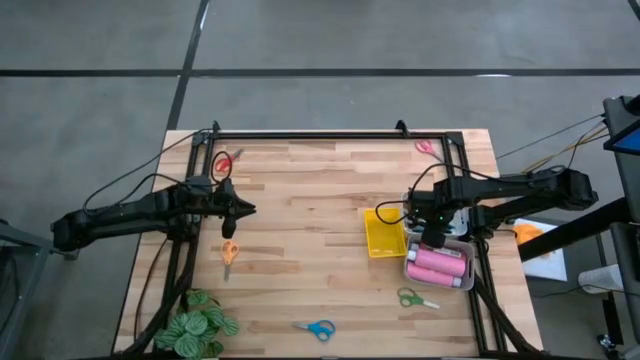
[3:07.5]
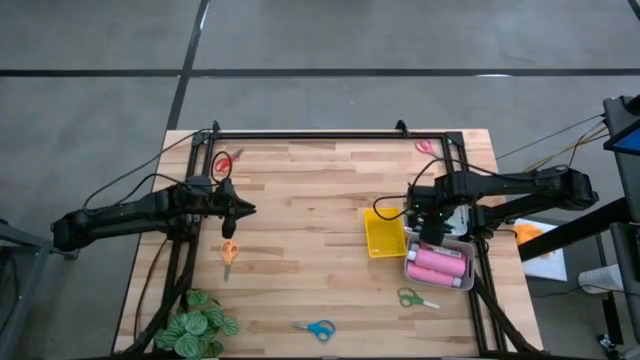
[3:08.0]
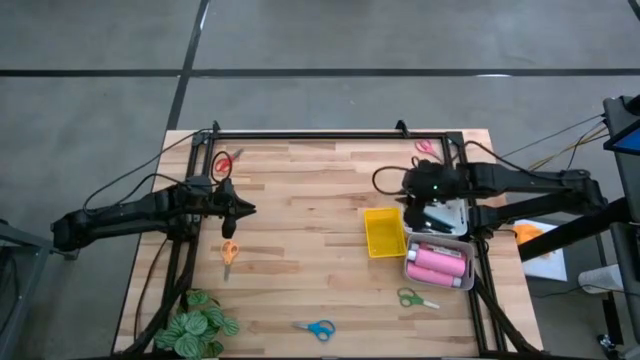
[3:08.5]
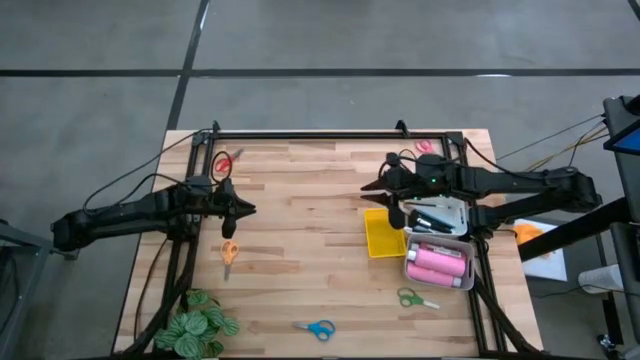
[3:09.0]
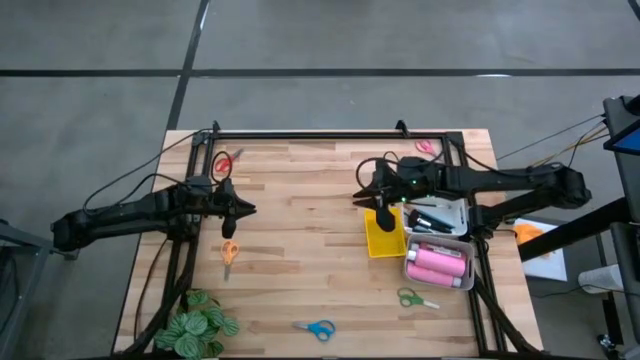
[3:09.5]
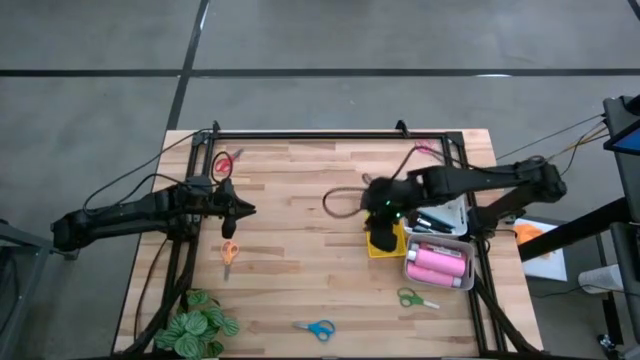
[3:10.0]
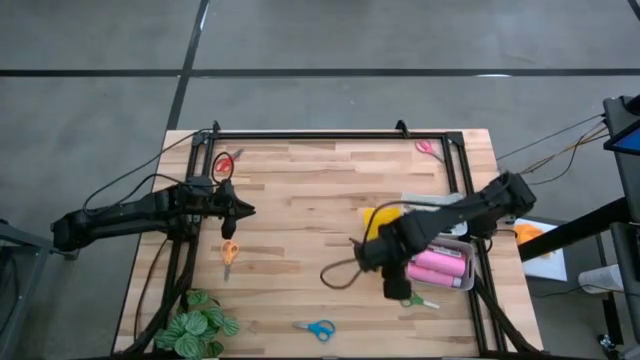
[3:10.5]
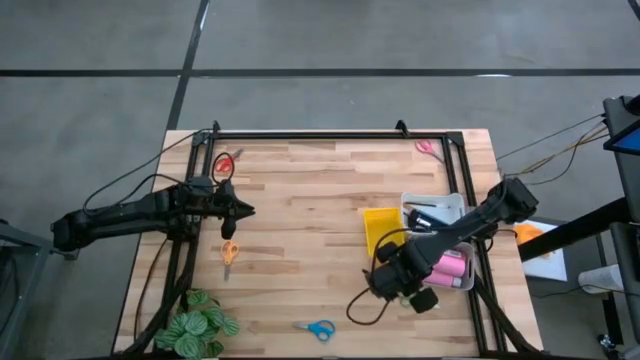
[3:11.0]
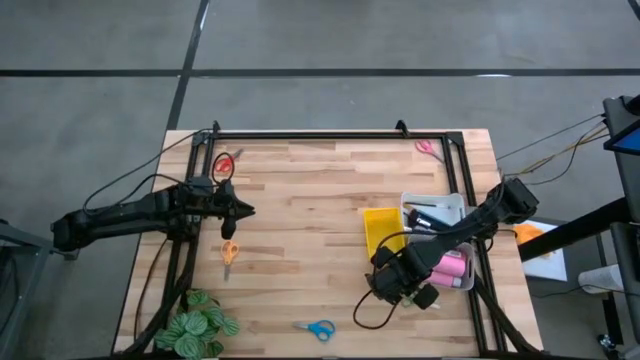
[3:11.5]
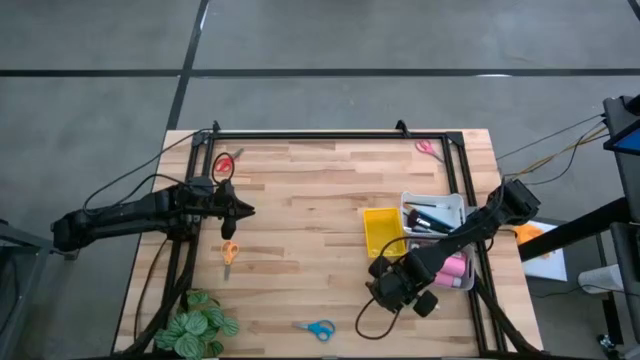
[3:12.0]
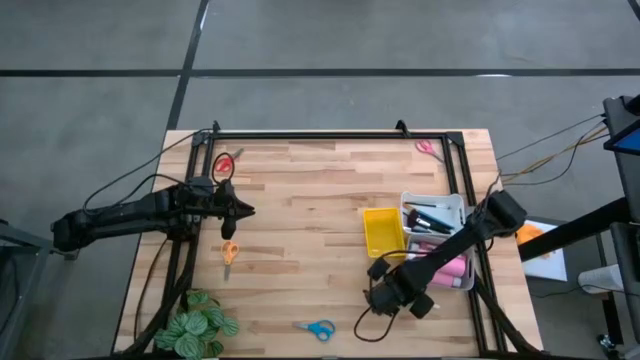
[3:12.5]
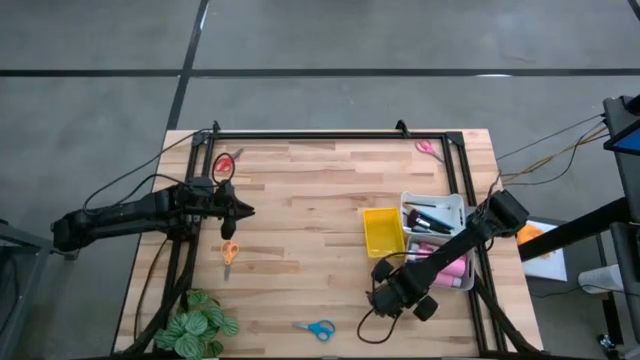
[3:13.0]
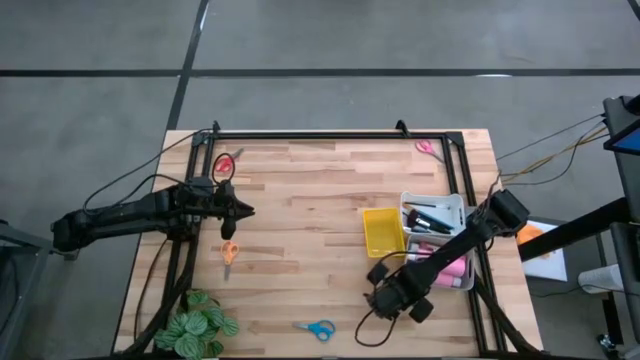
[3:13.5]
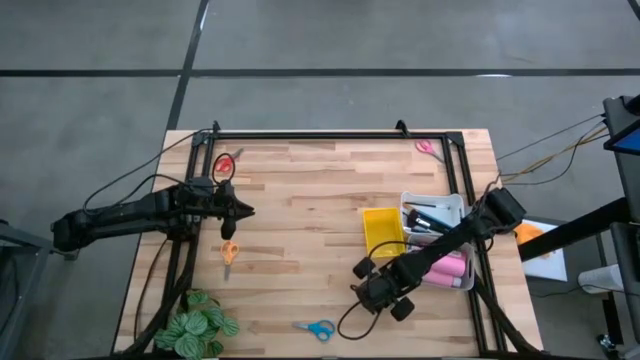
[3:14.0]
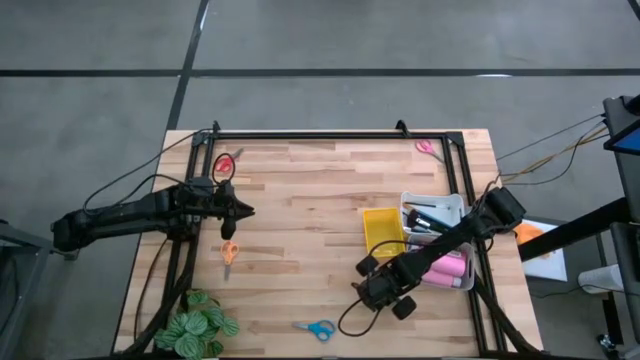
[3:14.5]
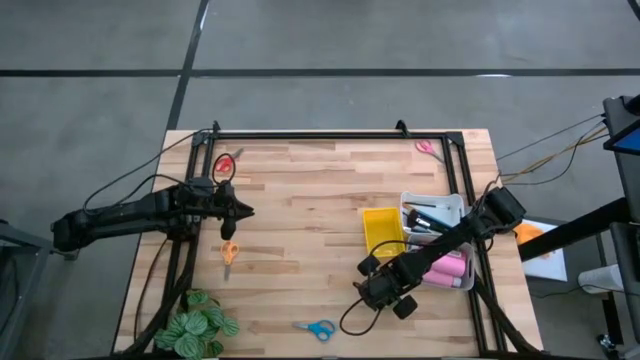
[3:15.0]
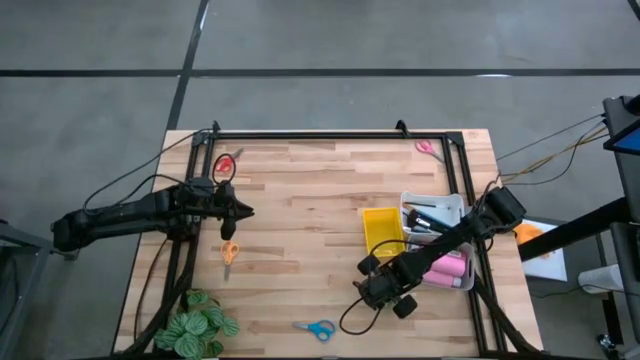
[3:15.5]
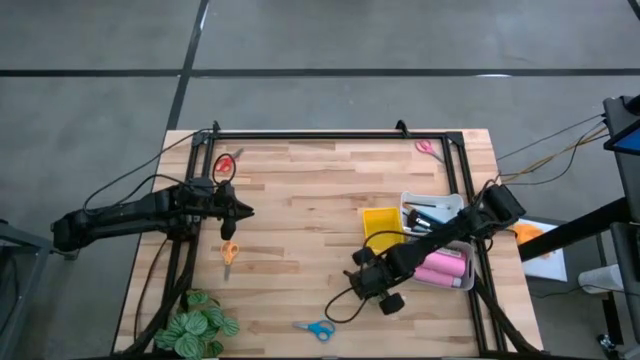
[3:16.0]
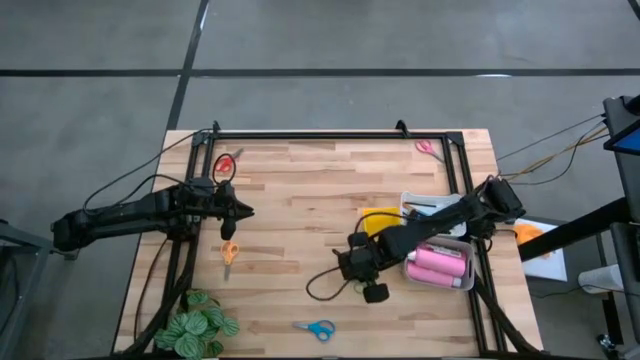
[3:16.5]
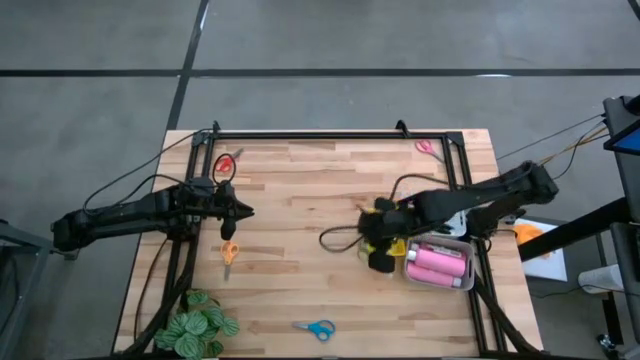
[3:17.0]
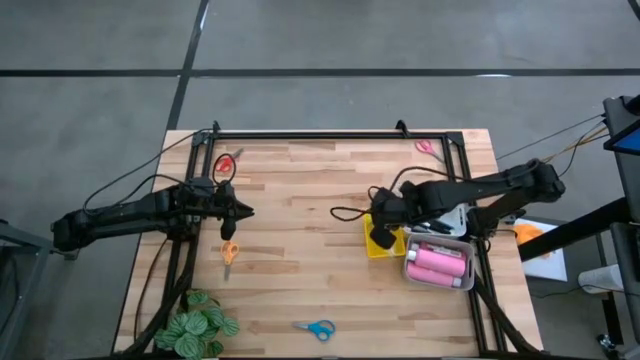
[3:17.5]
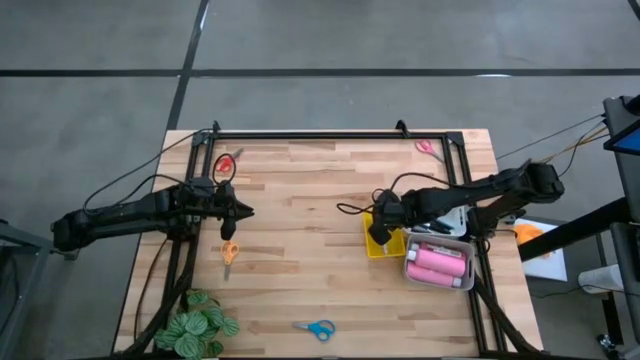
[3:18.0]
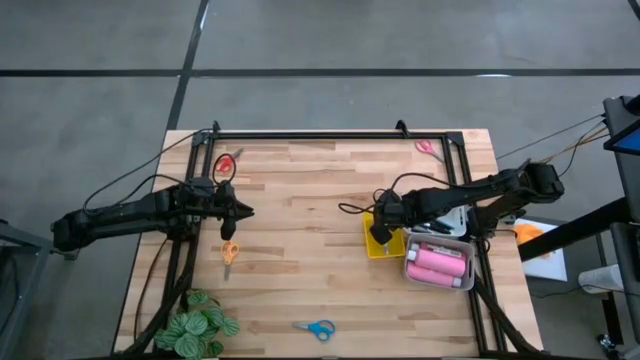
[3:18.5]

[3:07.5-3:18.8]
Task: Pick & Place Paint Supplies
Put the green scissors into the yellow bin

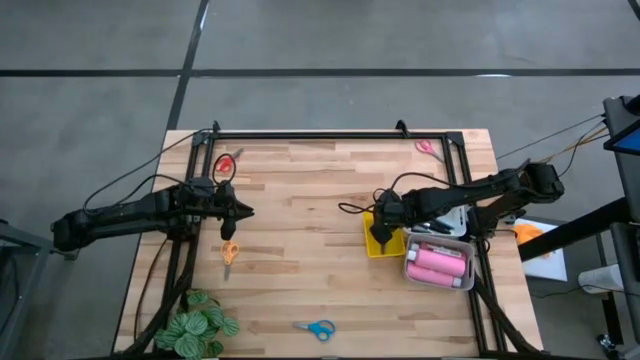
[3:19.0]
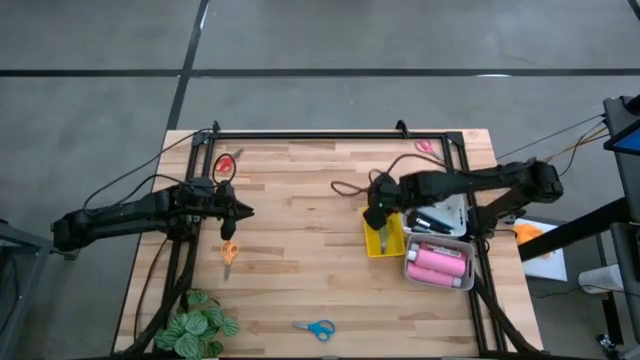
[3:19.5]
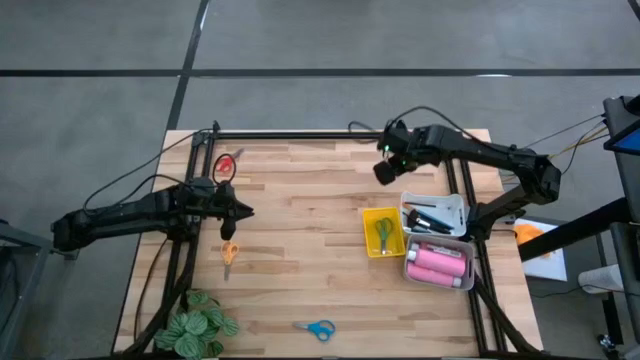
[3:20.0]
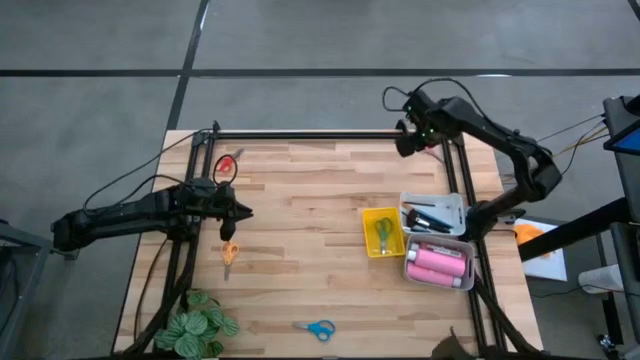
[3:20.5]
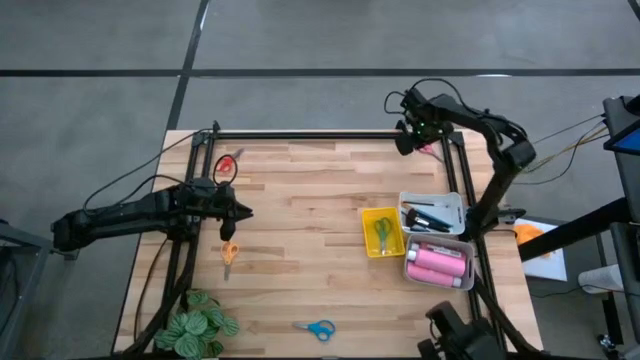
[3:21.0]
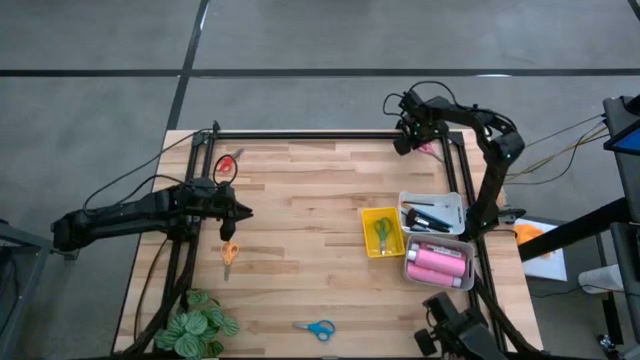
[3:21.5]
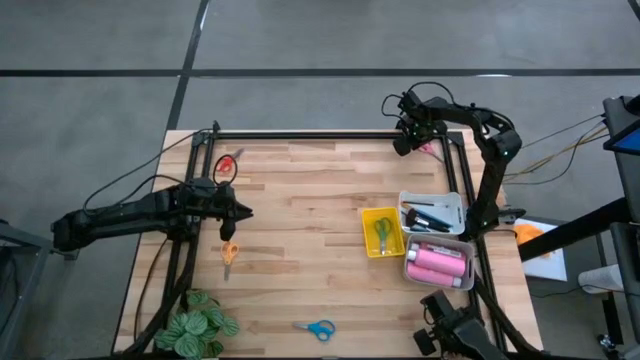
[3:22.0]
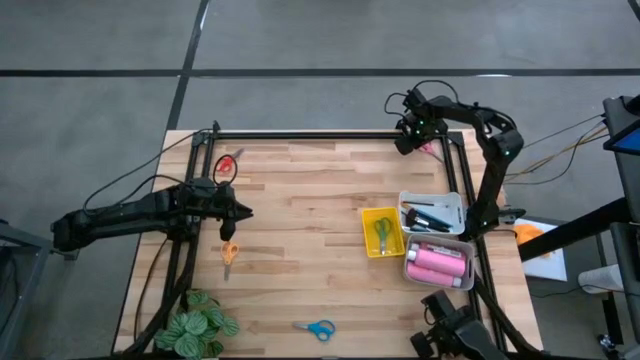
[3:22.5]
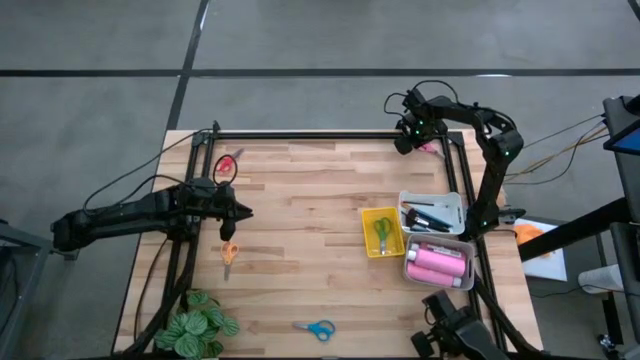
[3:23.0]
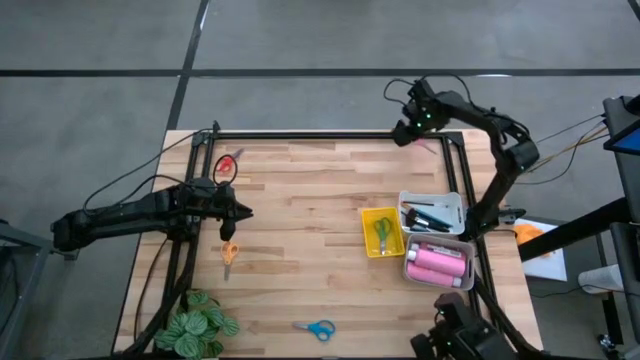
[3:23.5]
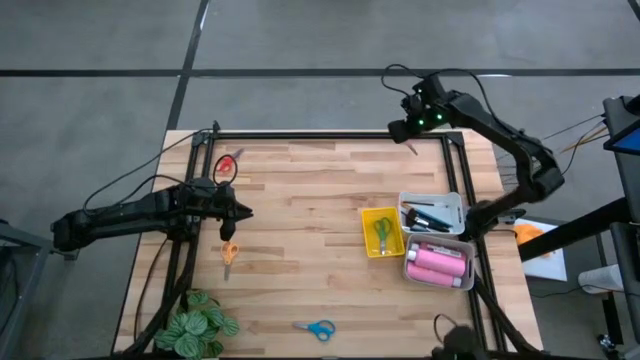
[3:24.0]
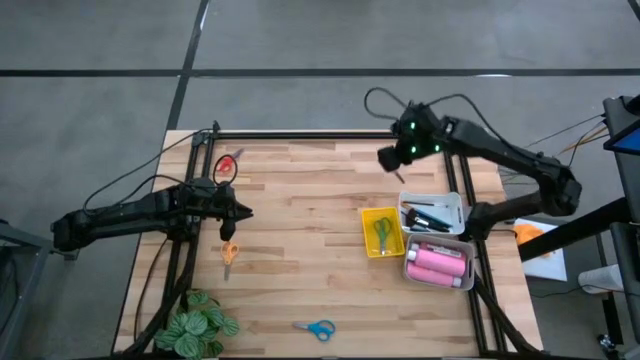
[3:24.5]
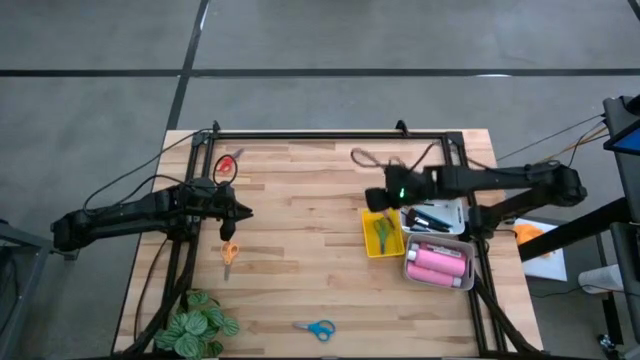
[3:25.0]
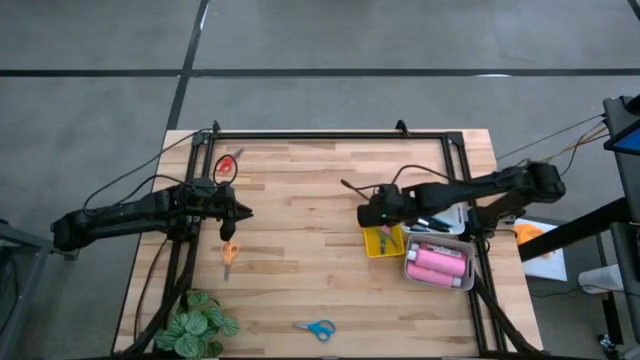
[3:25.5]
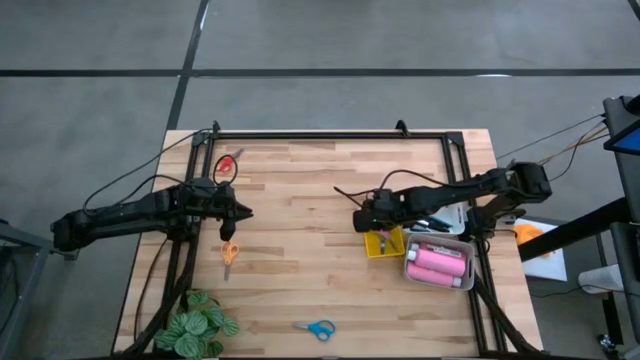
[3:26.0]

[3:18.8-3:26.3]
Put the pink scissors into the yellow bin

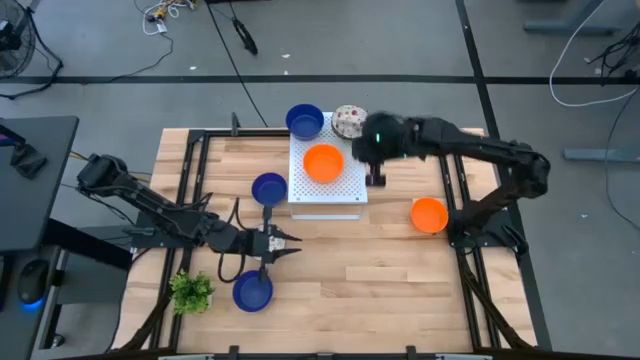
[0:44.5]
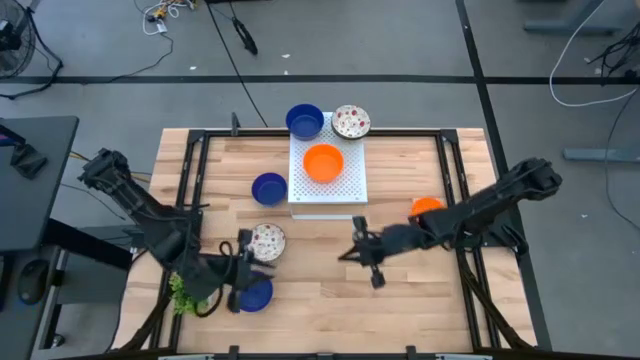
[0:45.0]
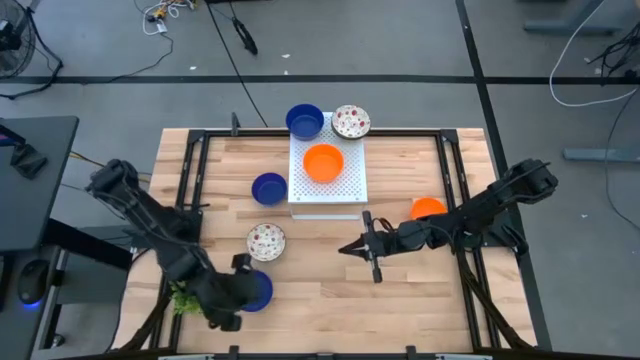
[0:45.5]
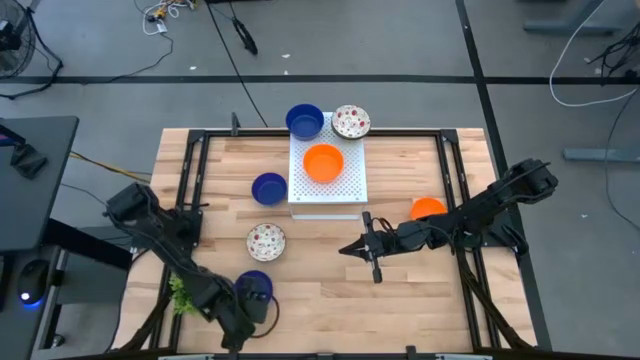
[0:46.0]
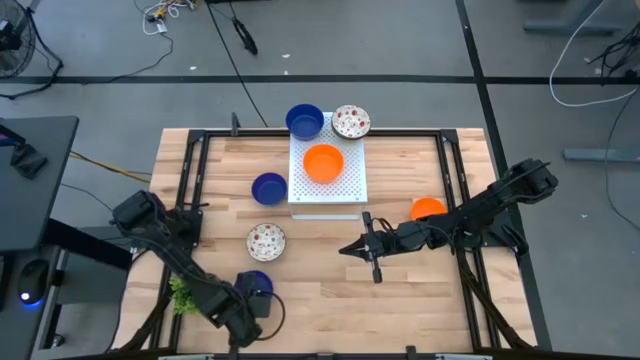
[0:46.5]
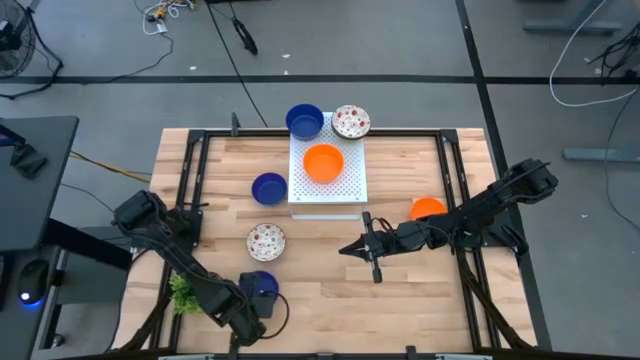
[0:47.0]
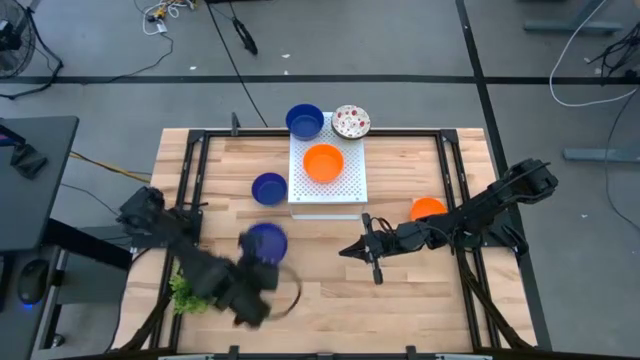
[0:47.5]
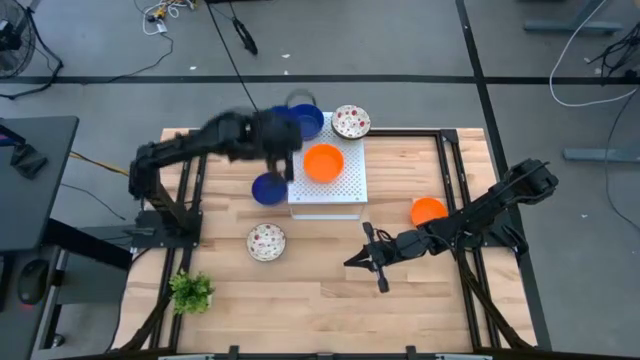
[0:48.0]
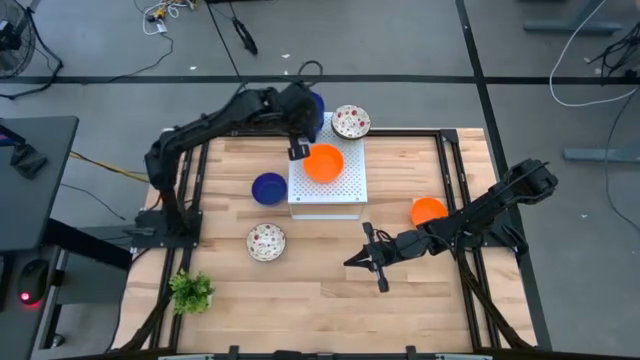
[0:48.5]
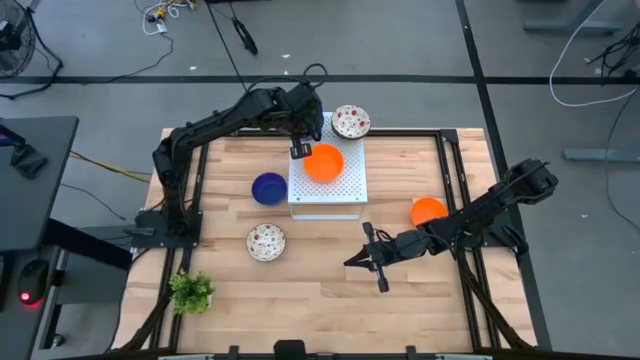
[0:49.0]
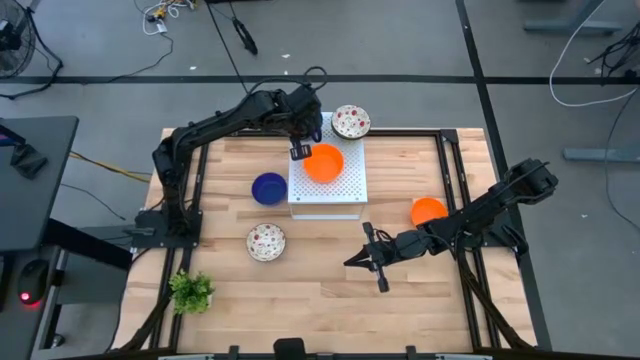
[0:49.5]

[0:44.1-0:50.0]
Task: Pick & Place Mini bowls
Stack the blue bowl on the other blue bowl on the shelf
